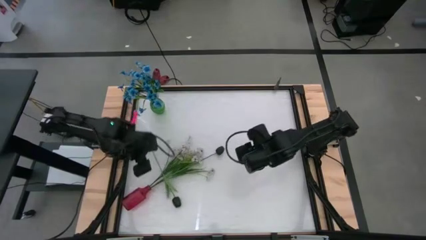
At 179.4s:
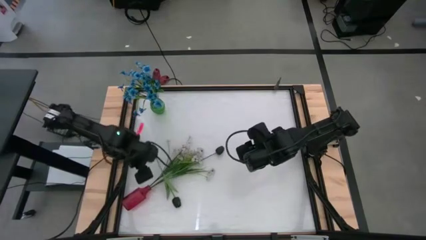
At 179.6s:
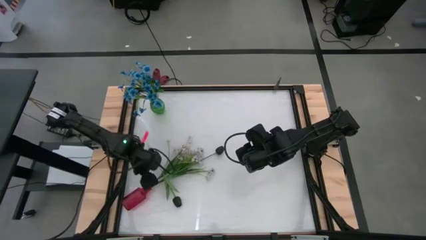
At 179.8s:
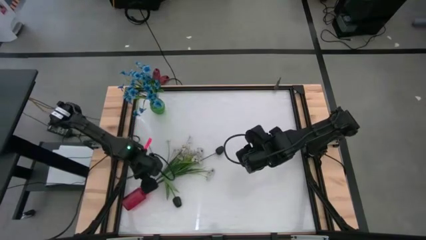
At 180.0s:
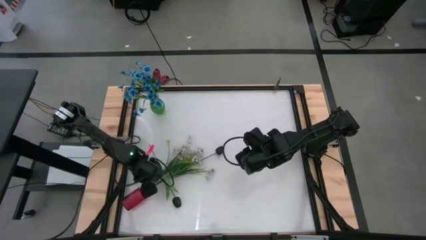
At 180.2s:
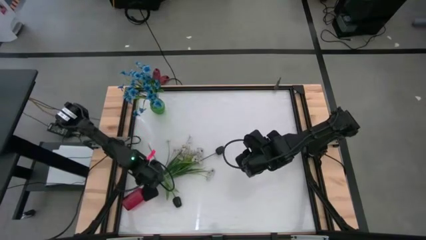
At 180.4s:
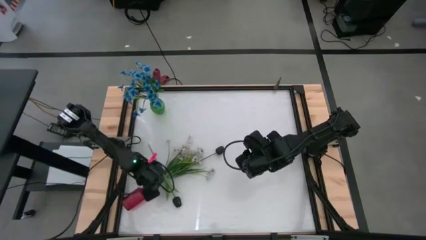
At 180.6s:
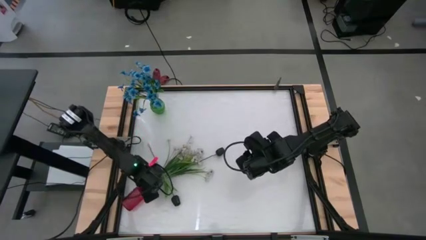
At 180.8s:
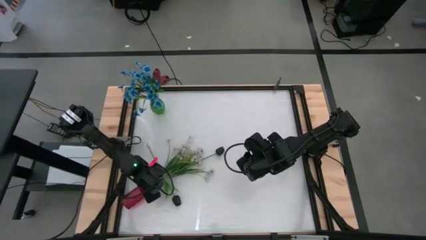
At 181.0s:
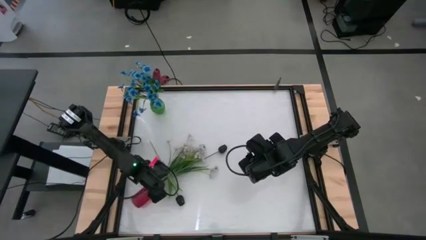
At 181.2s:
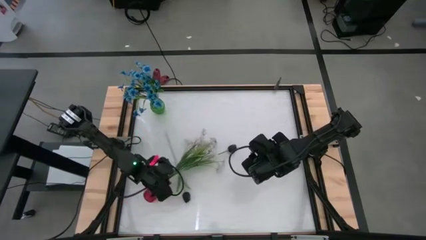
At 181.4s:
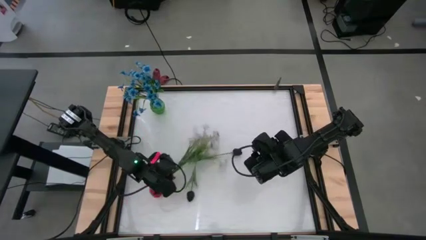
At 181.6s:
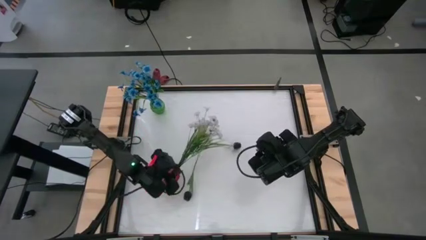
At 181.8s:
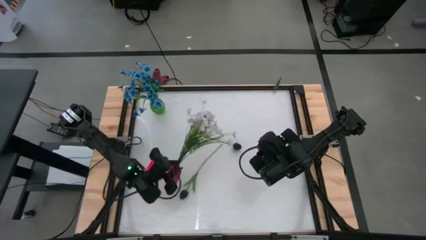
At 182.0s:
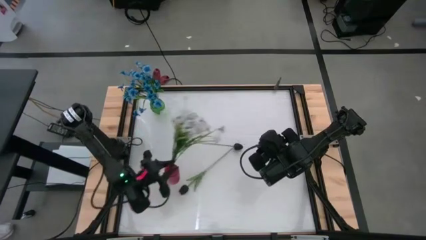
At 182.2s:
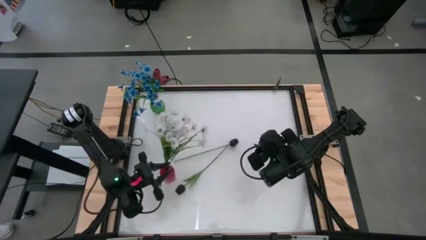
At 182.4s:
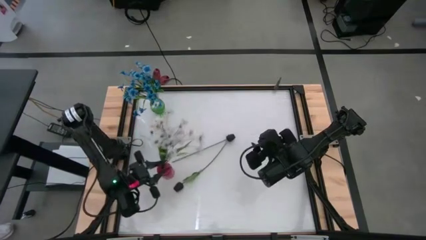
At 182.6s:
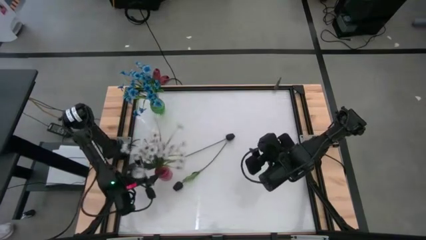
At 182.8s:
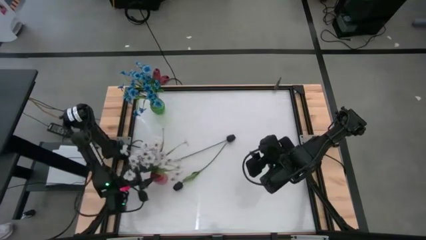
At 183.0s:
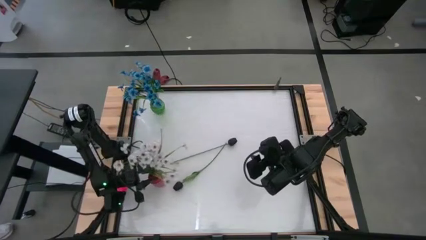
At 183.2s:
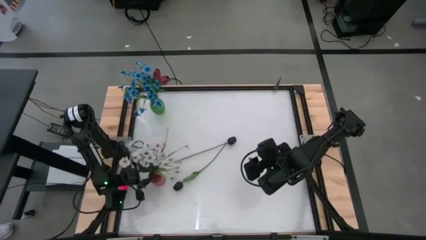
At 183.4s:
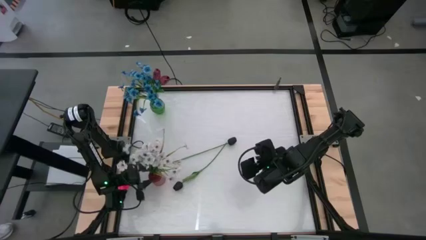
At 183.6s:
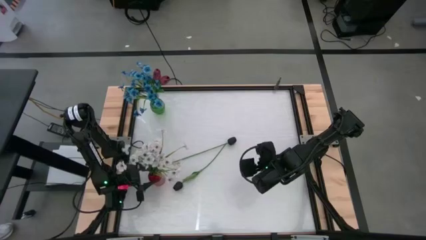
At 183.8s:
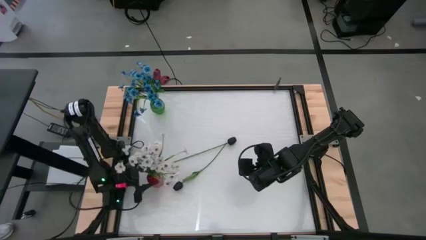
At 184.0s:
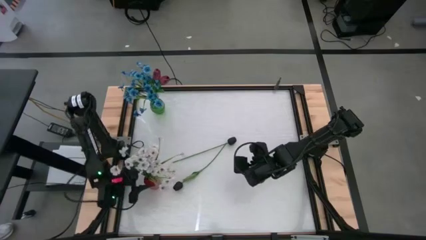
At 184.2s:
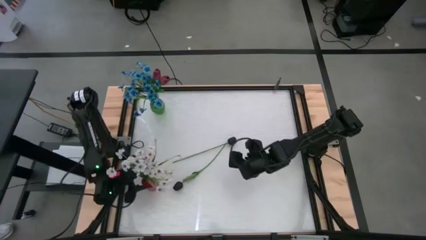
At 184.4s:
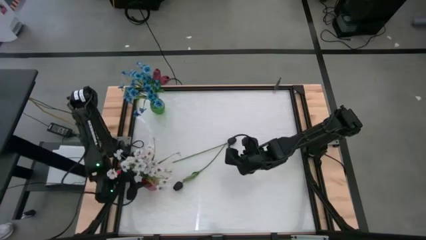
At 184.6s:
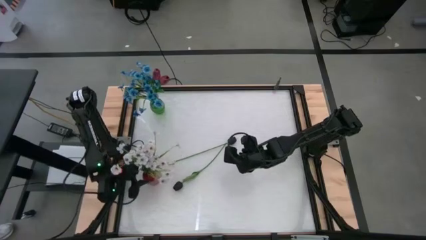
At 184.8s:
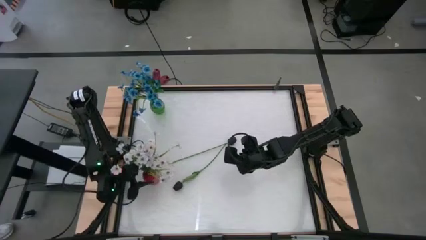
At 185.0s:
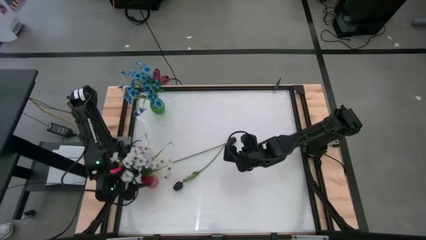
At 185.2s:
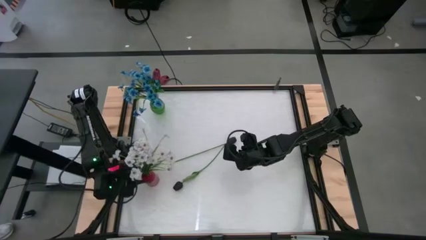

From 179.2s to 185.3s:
Task: Sort flowers into vase by color
Adjust the red vase

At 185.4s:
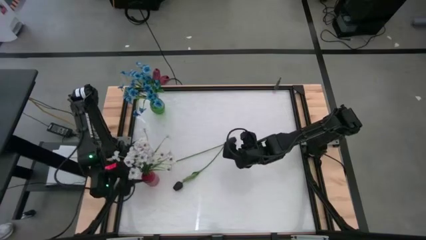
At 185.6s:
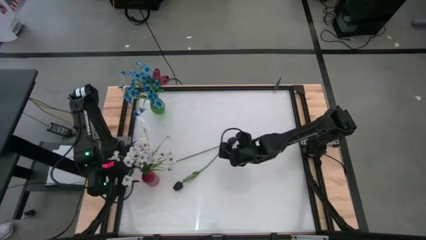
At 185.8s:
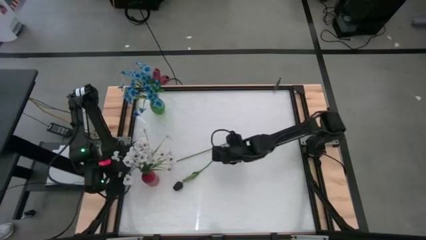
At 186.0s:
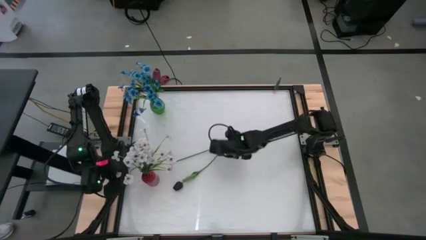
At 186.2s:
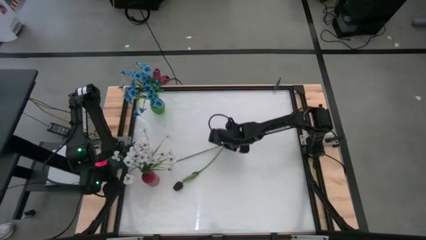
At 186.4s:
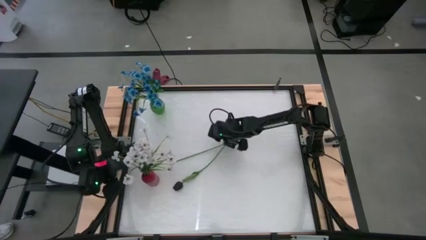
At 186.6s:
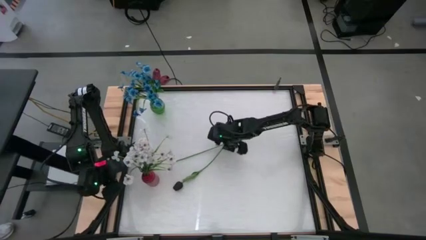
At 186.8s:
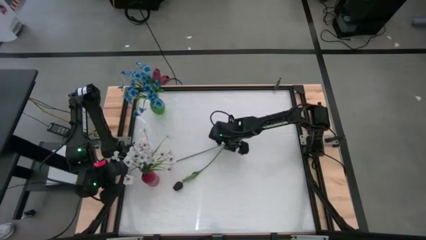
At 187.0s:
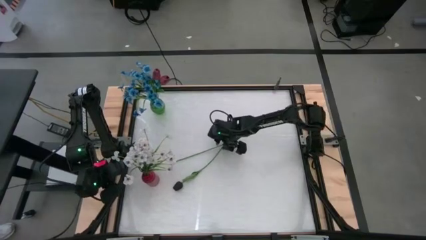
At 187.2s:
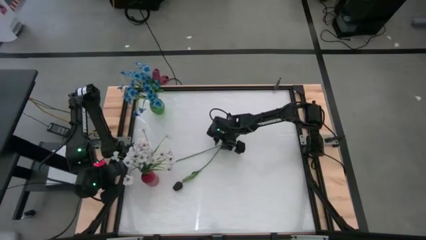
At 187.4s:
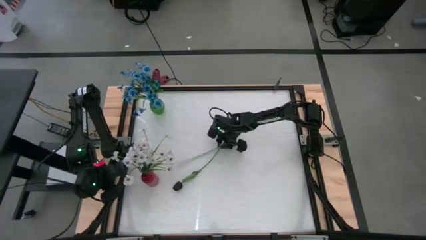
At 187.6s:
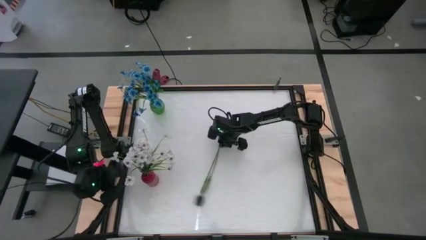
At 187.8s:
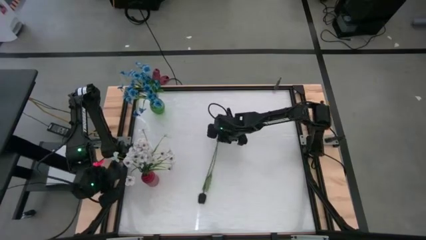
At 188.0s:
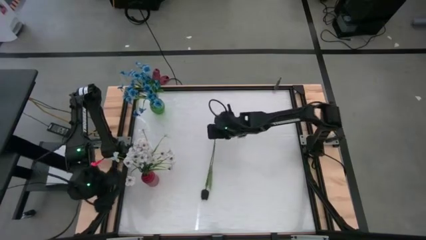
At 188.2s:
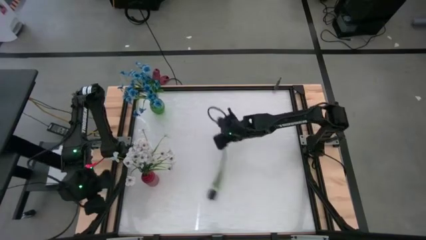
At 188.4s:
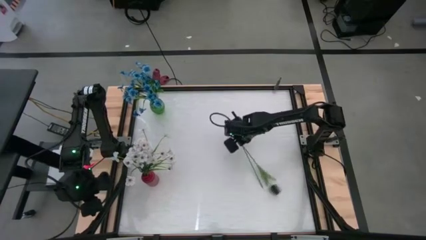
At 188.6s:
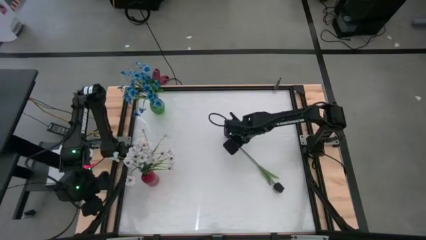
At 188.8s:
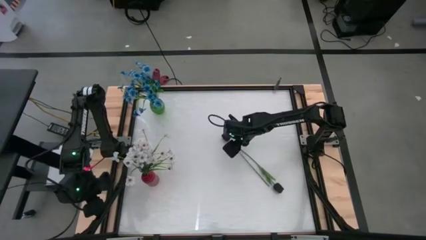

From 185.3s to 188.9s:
Put the top black tulip into the red vase

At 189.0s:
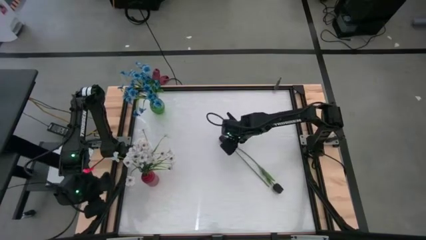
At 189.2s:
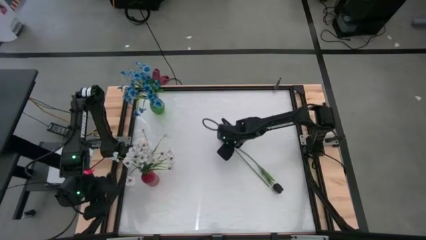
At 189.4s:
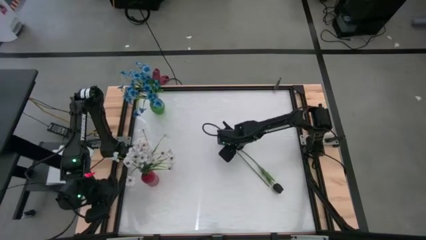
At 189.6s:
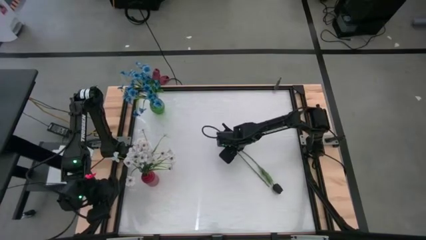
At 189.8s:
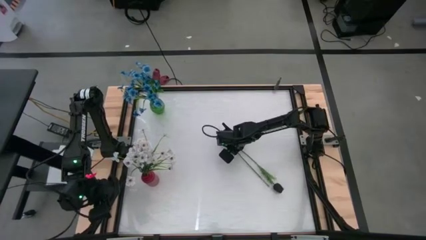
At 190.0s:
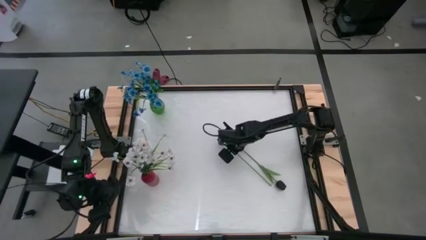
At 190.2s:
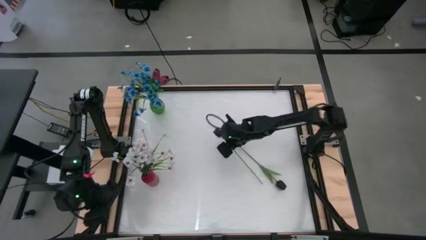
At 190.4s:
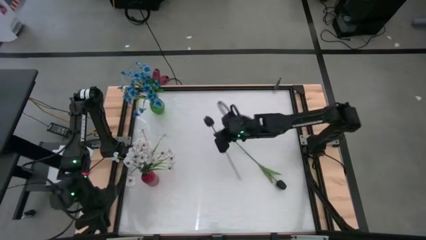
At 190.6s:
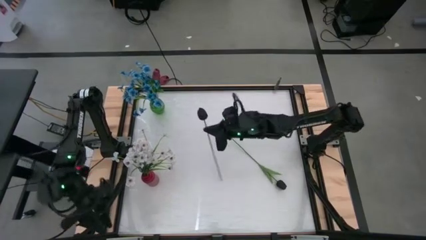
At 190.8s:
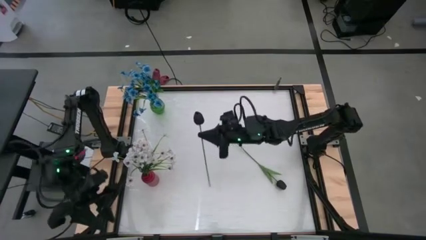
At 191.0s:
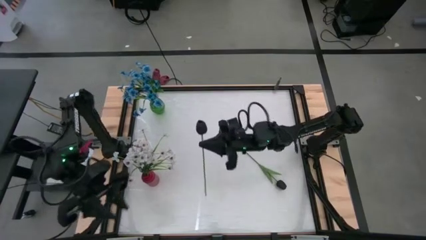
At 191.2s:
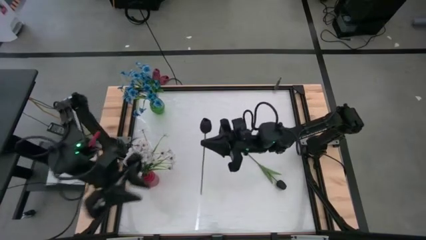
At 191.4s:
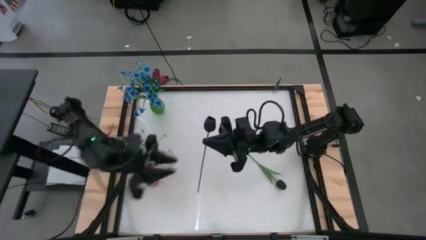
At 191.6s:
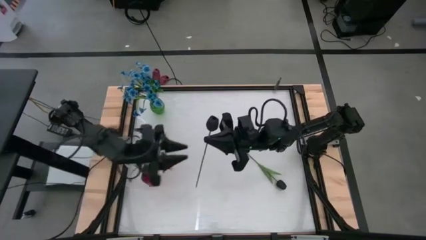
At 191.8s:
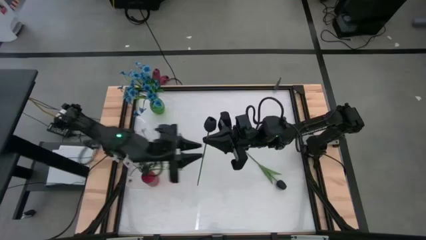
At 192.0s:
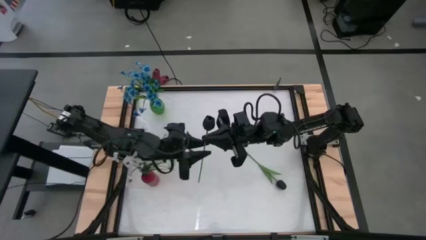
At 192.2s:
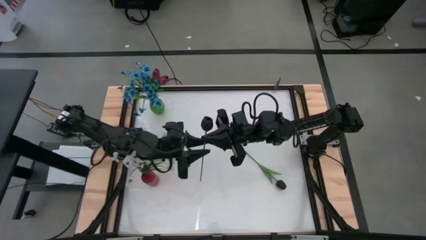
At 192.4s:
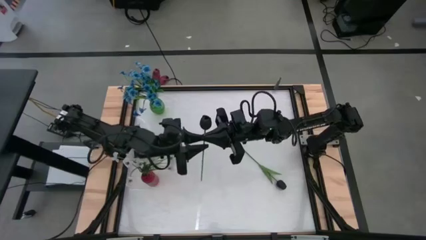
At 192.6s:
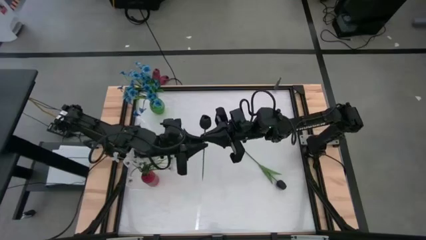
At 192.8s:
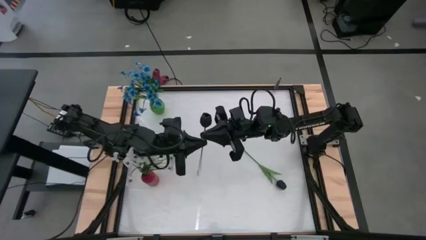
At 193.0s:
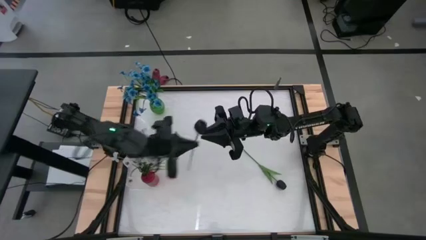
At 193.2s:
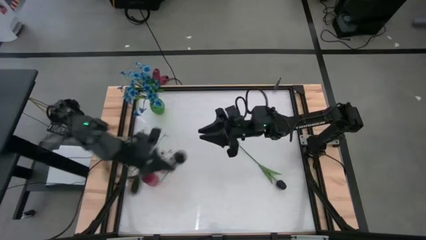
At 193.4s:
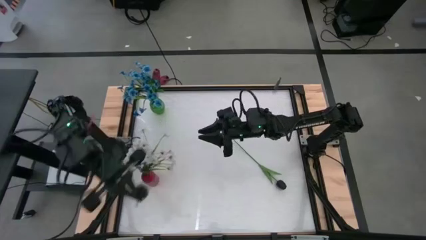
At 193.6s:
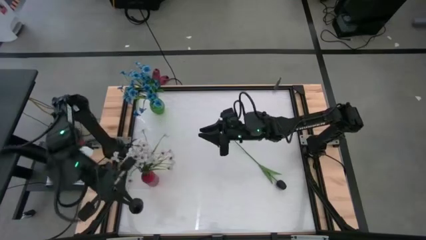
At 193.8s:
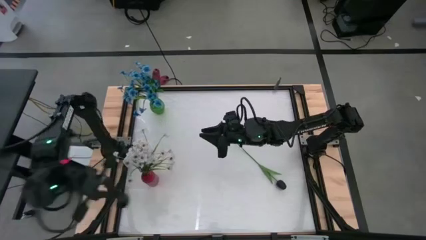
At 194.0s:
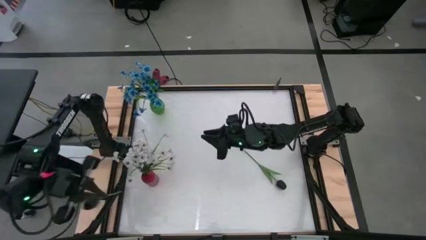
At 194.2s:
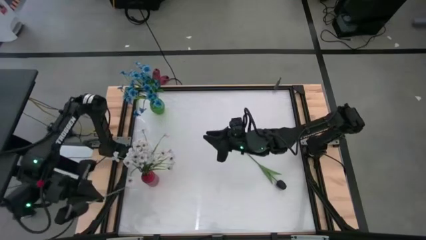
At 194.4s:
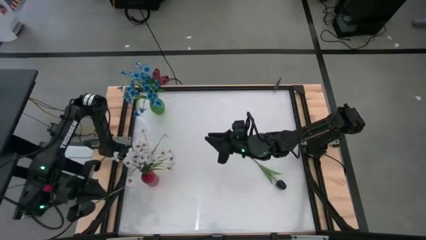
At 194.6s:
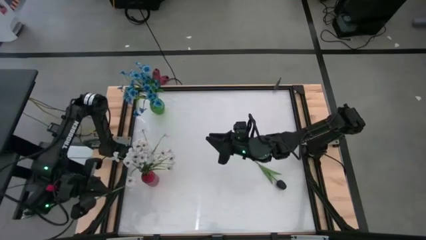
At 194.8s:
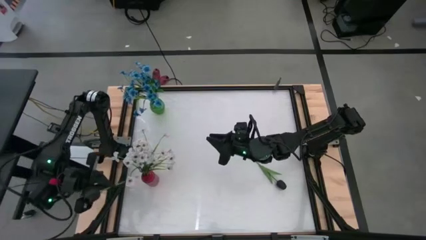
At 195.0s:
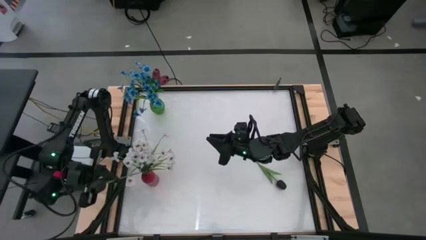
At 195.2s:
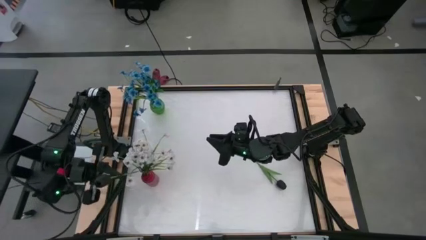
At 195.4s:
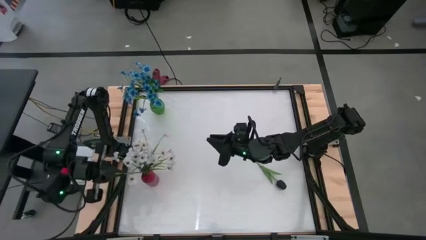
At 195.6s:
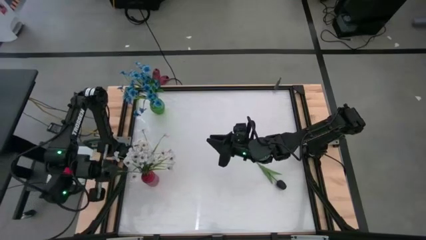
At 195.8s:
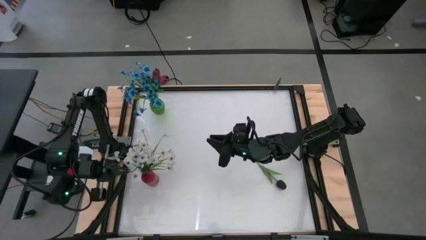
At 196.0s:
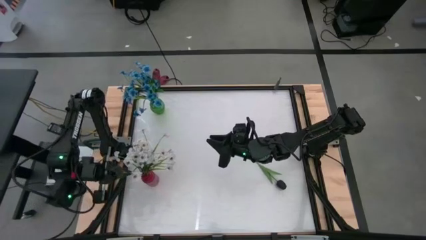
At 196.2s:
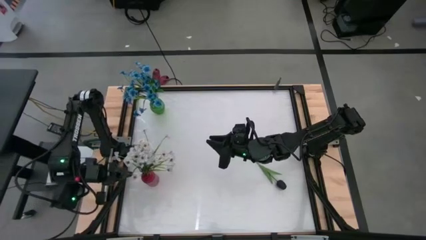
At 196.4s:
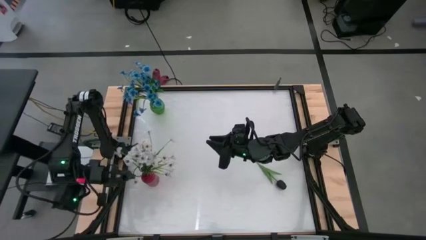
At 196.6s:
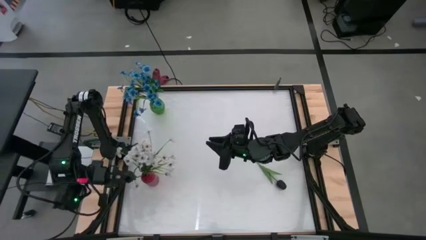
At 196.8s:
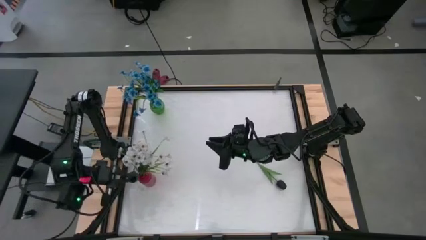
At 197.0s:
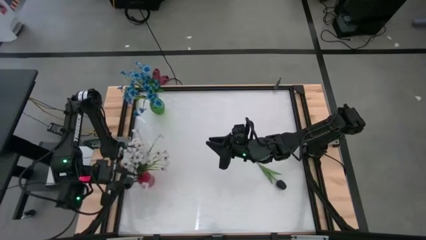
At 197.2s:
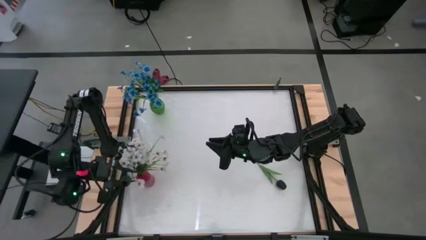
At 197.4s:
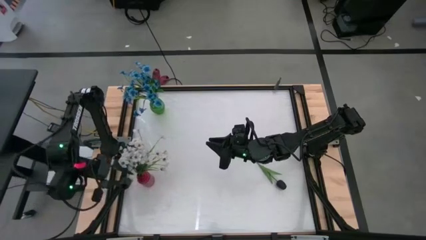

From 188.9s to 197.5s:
Put the left black tulip into the red vase
